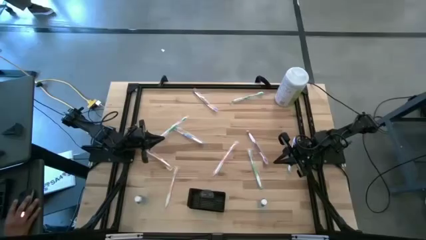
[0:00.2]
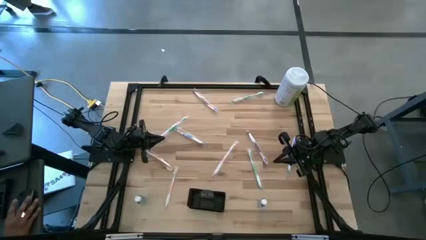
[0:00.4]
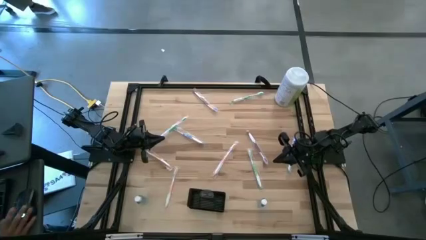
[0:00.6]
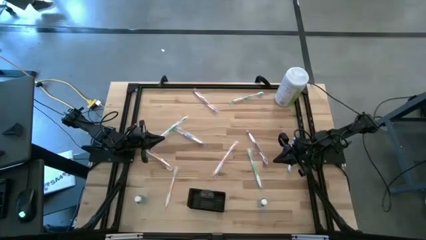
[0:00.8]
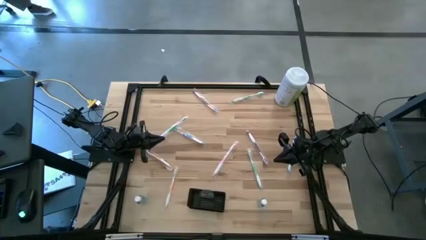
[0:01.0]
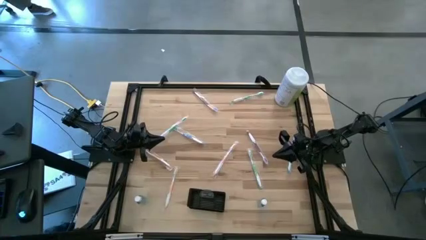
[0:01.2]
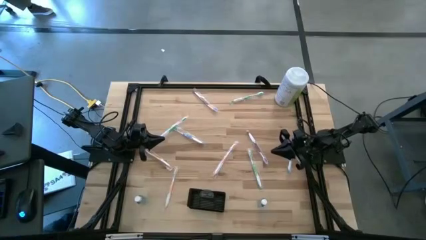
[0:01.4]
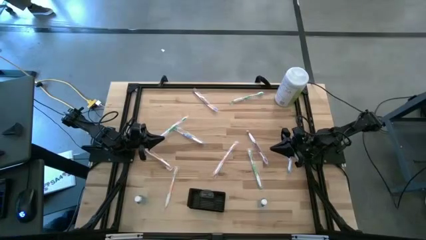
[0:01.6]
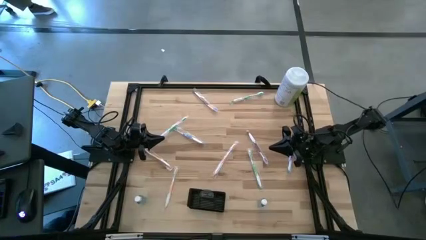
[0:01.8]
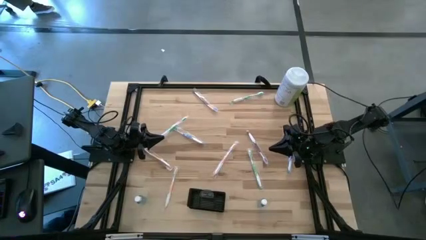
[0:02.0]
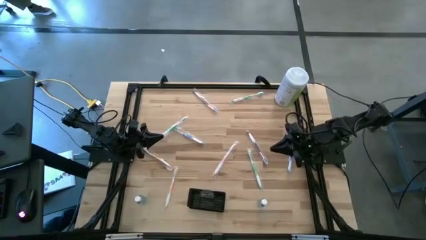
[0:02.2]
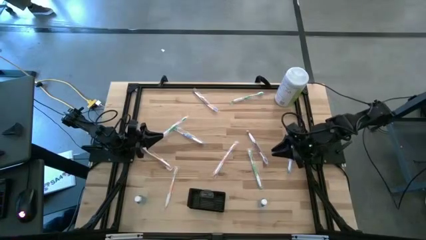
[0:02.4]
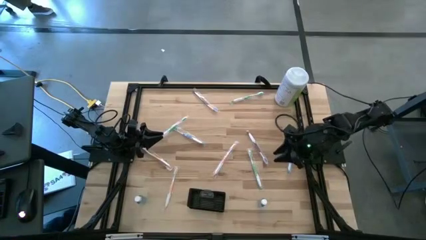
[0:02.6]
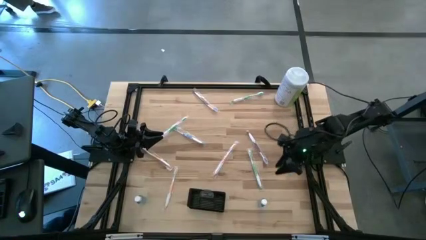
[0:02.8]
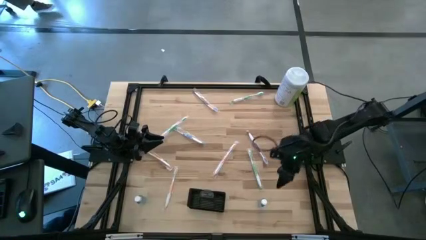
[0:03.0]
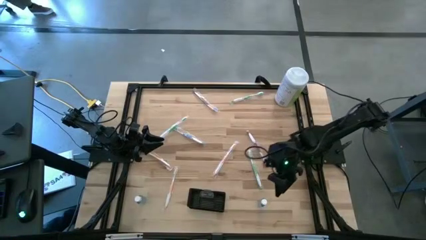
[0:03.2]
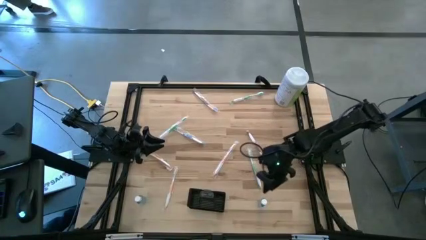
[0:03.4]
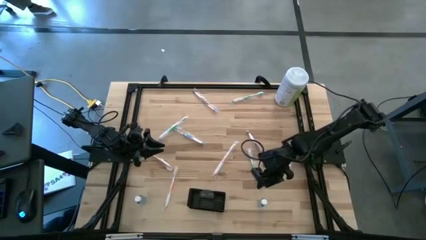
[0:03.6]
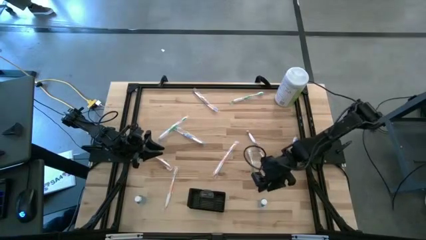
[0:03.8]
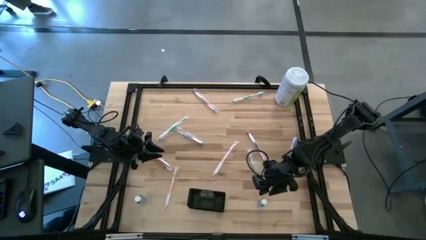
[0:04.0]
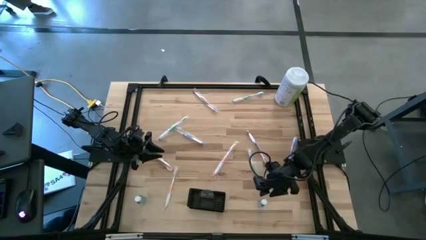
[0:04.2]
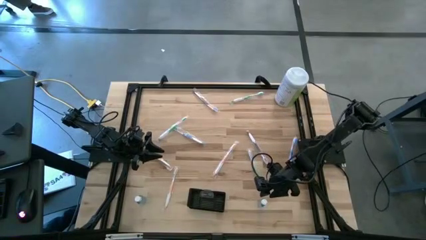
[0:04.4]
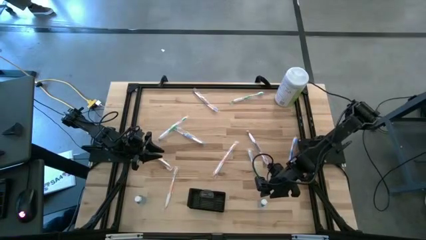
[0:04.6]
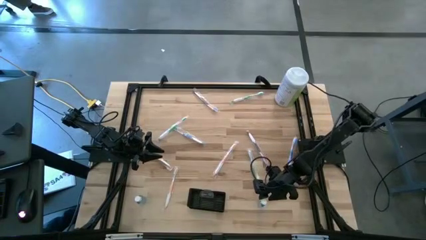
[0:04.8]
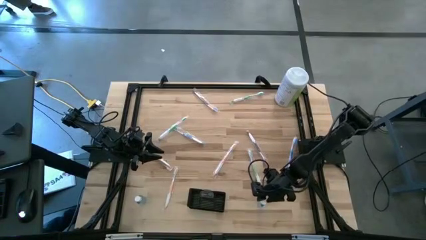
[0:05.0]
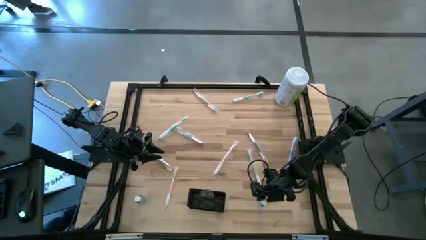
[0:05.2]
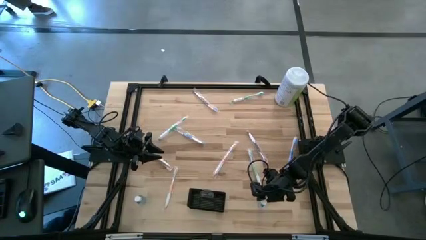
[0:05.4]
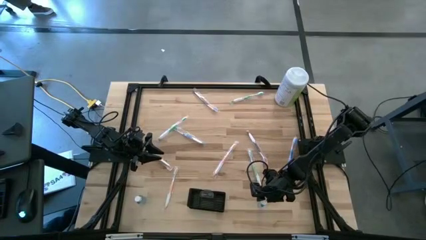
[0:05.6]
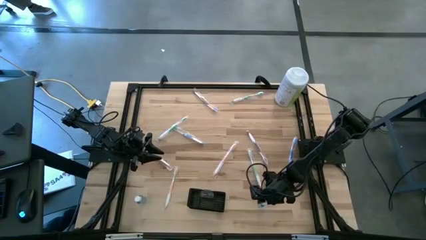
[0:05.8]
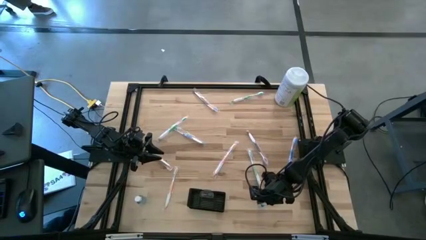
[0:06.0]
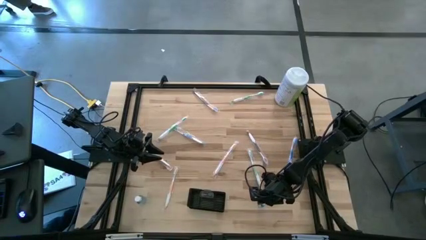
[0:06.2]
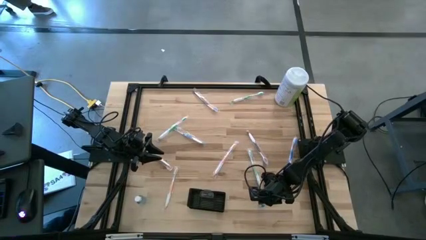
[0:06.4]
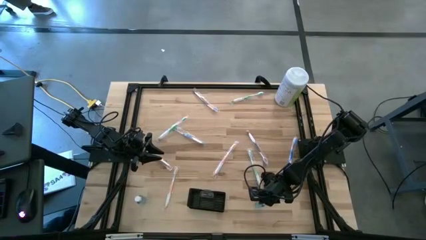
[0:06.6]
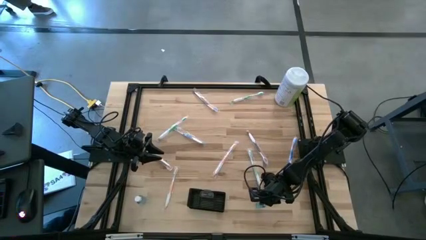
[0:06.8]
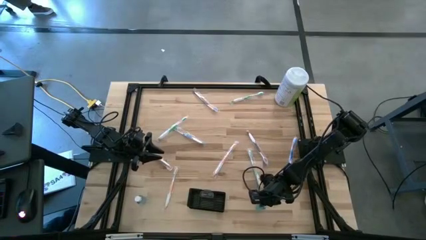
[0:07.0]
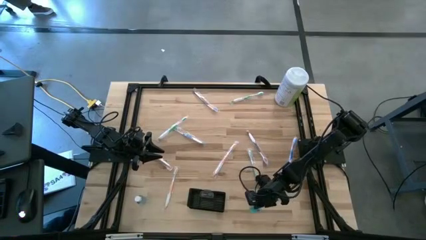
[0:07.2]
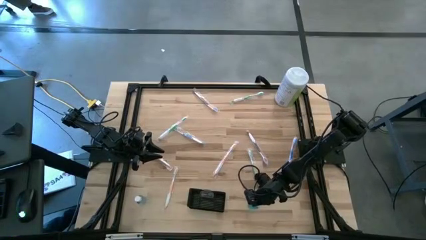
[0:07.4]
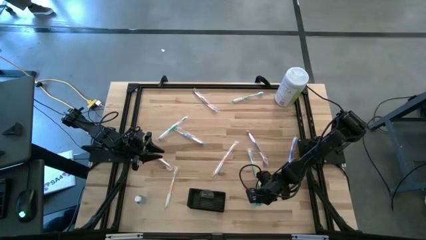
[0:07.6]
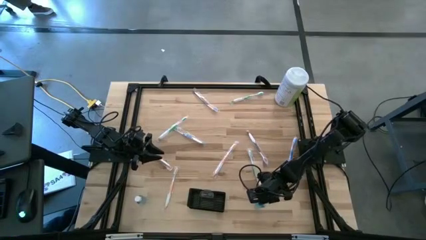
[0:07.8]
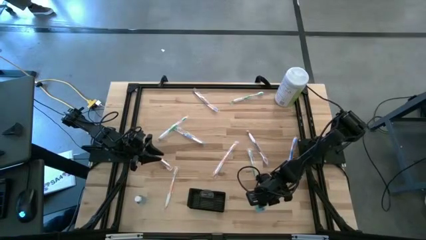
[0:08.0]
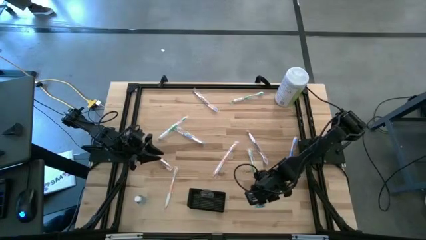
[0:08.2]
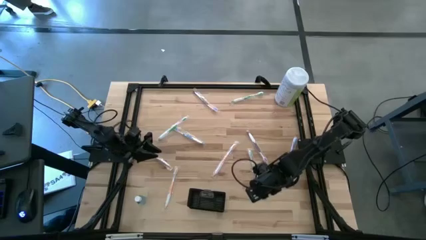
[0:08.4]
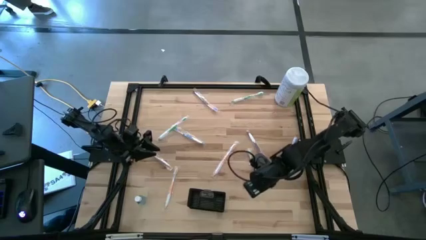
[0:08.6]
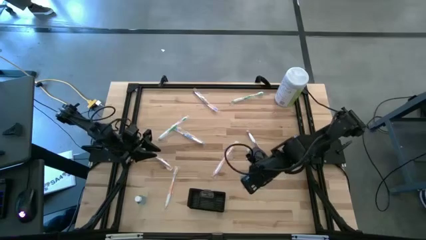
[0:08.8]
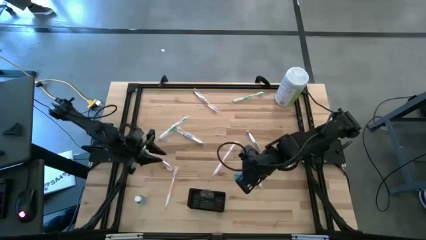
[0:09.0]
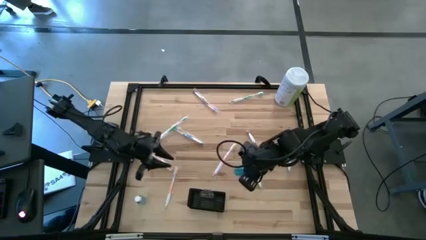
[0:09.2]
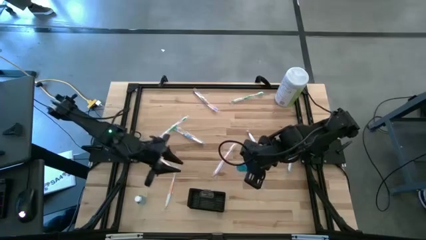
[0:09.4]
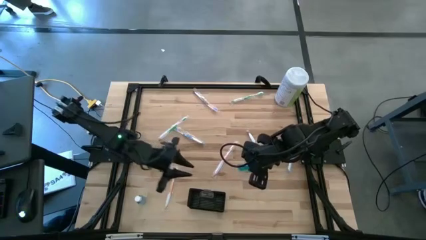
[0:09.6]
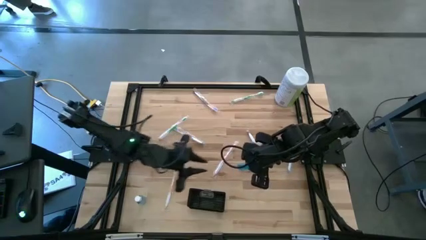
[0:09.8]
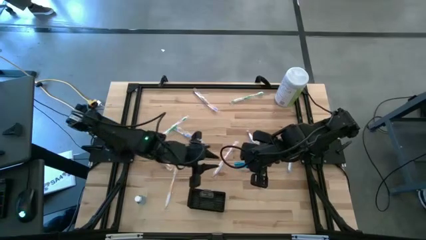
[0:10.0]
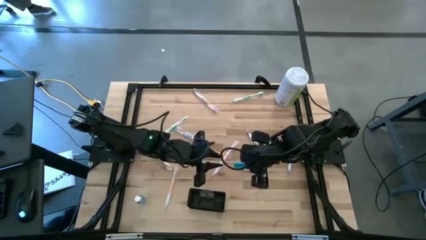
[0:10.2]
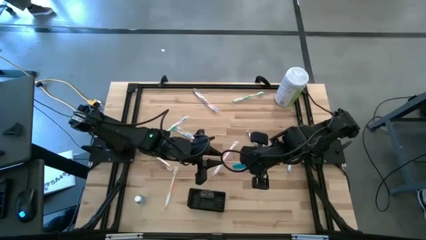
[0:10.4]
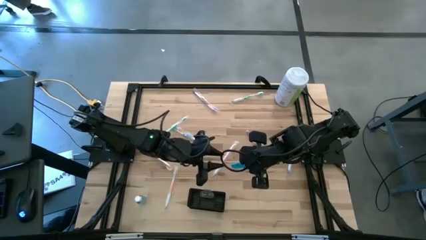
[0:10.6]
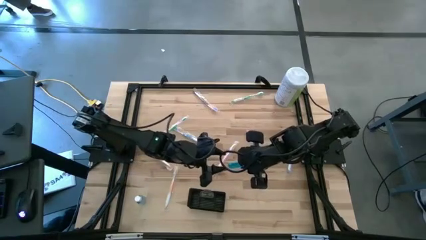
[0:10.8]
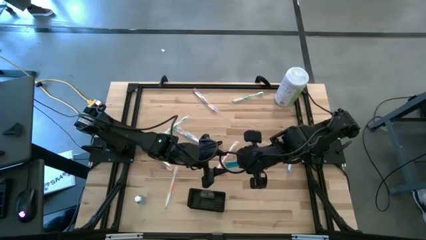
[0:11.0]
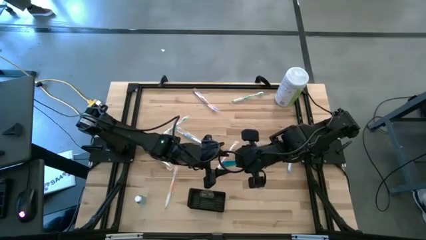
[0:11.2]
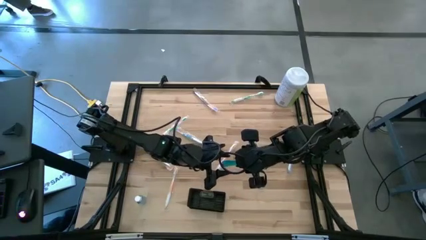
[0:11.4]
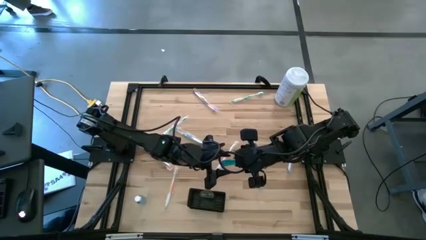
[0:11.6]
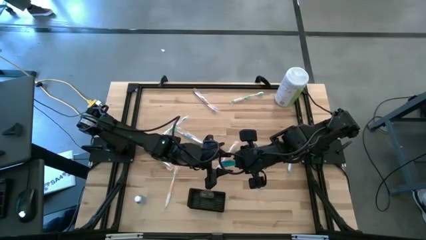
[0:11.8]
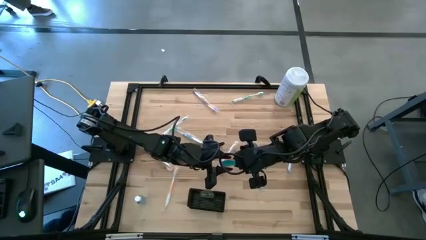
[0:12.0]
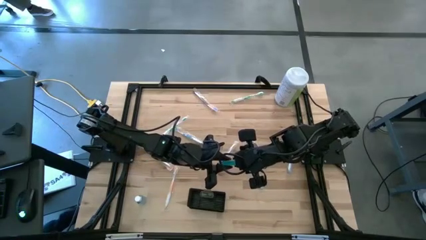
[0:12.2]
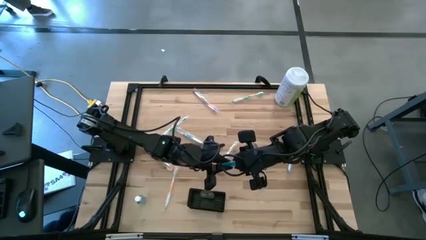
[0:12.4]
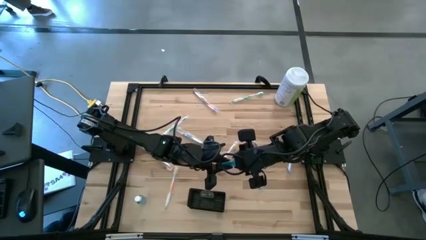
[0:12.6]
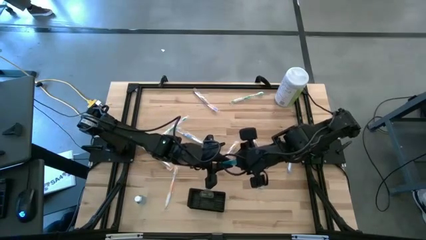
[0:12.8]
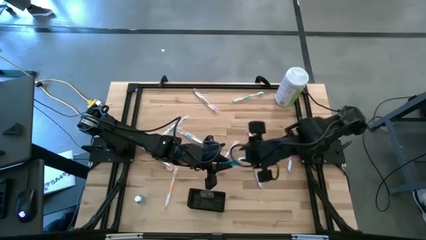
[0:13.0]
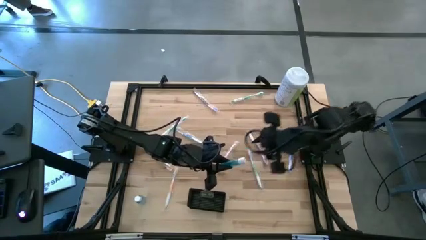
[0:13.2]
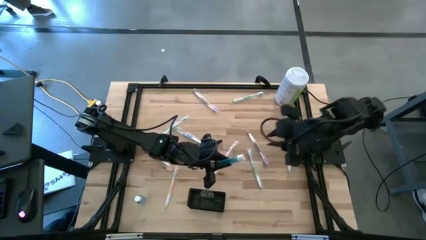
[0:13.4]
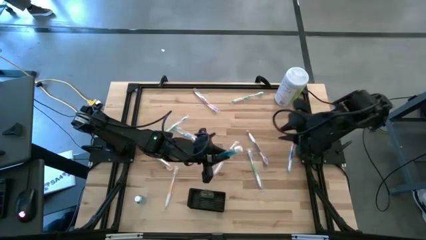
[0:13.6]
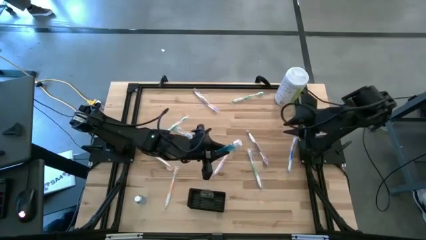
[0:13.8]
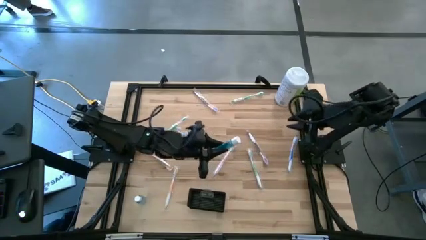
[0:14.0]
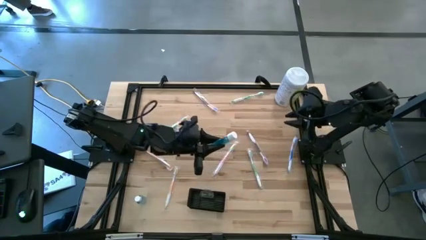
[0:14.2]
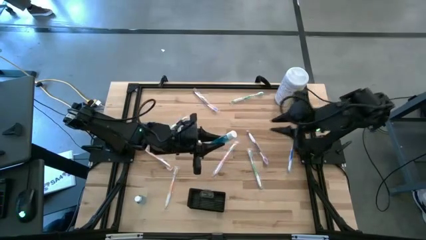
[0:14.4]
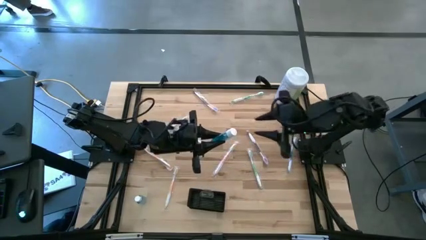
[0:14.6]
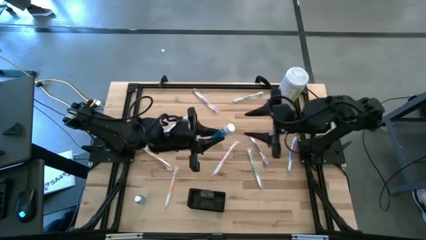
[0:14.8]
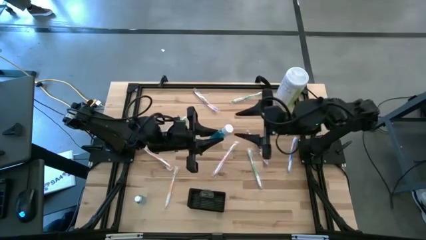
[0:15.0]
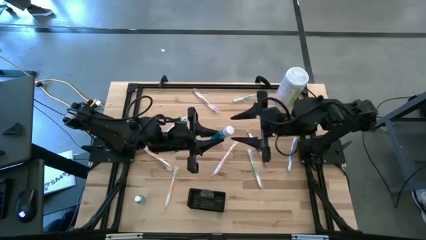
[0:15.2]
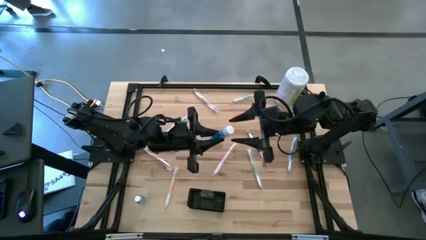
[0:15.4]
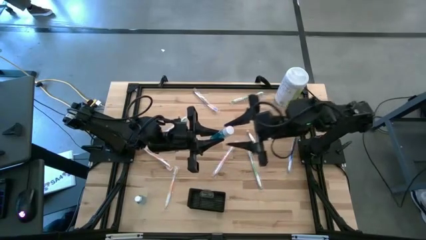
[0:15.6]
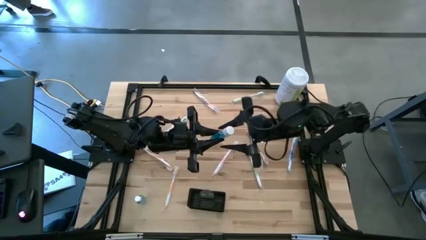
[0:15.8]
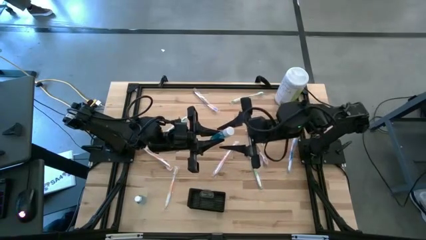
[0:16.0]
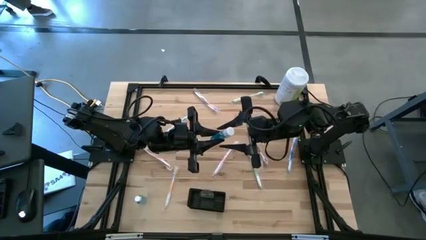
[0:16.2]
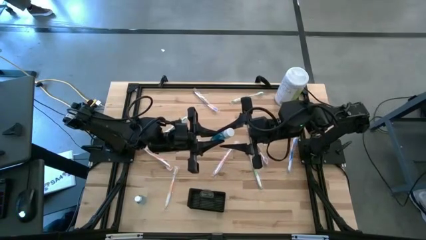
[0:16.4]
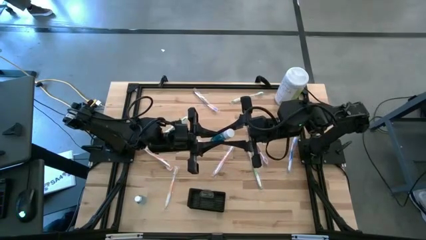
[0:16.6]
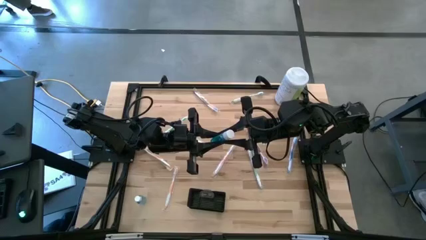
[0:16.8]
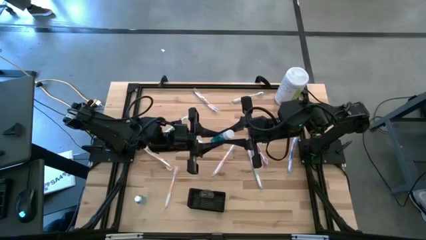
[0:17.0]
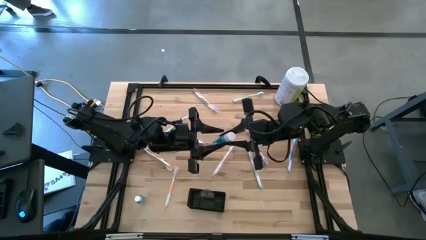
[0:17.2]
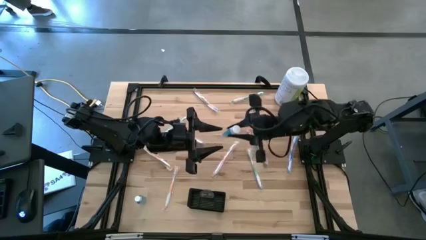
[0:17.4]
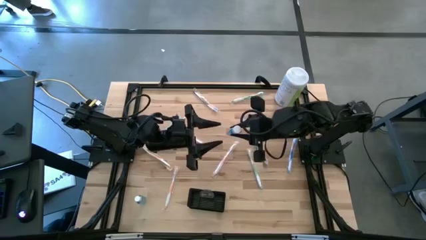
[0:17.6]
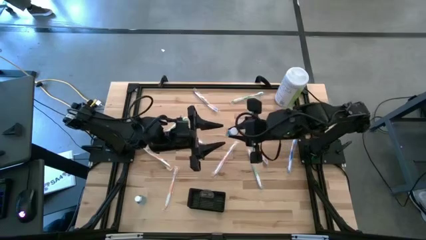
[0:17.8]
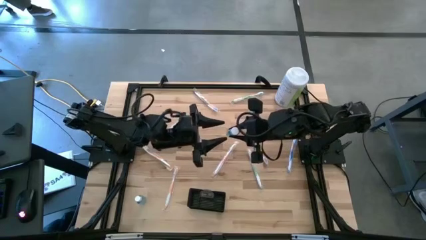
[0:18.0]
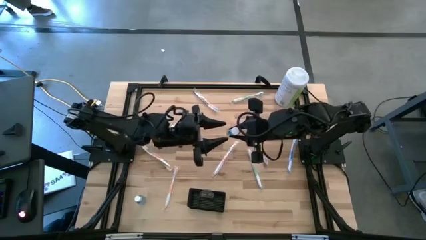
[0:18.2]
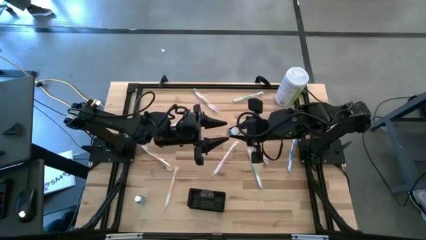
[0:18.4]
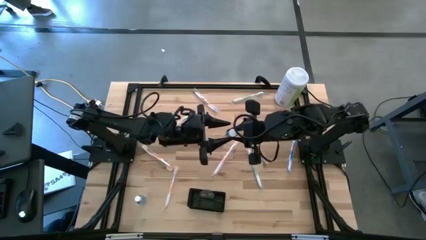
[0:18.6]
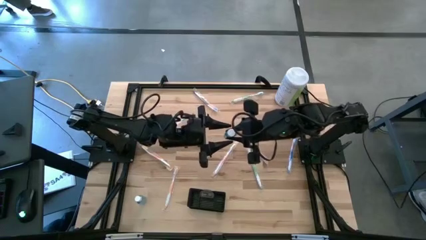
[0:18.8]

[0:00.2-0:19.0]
Task: Pick & Place toothbrushing station
Put the right blue mouthwash into the black wire organizer
